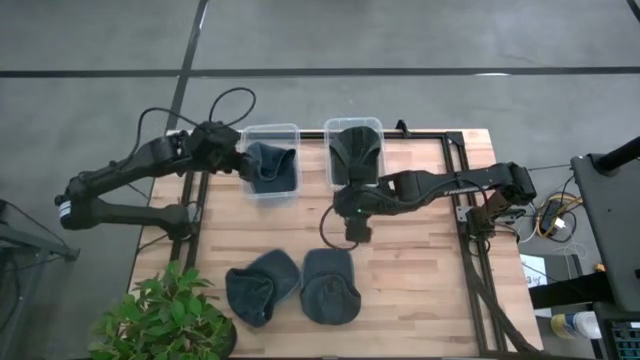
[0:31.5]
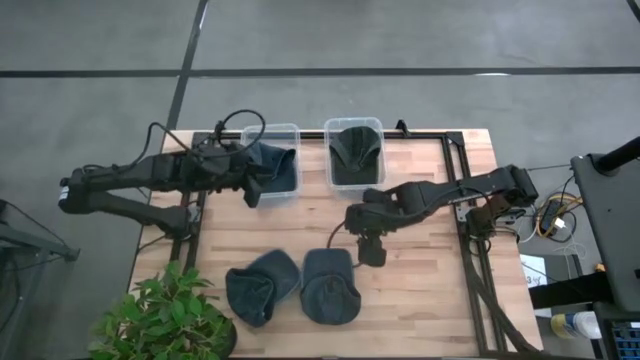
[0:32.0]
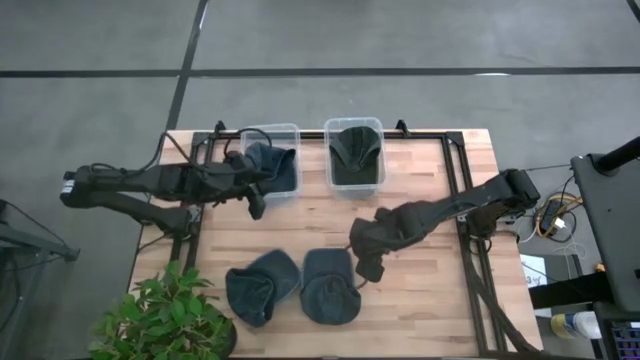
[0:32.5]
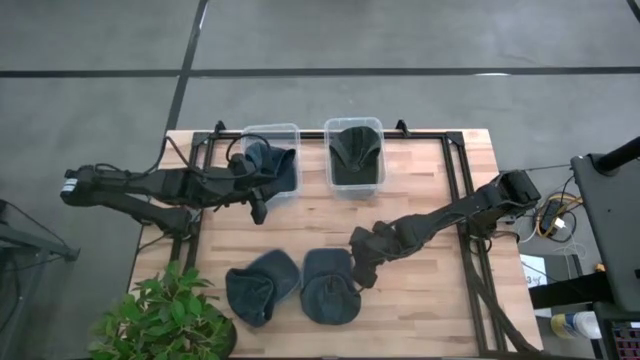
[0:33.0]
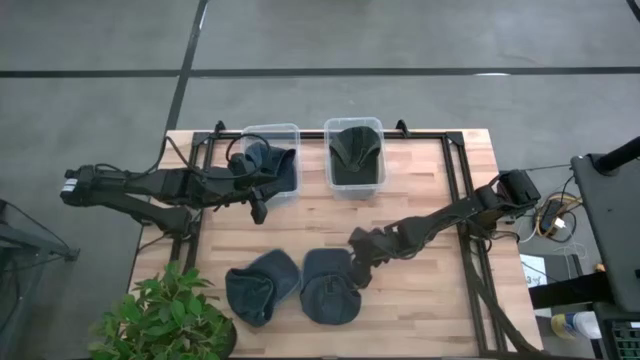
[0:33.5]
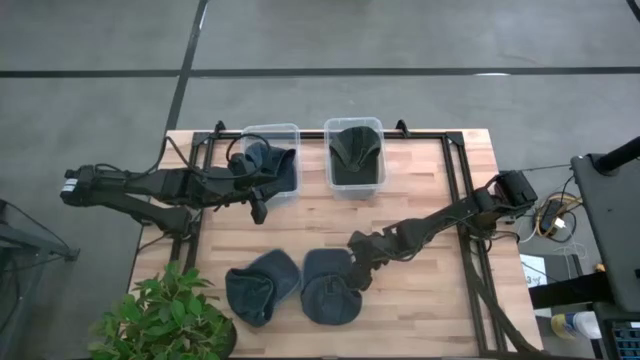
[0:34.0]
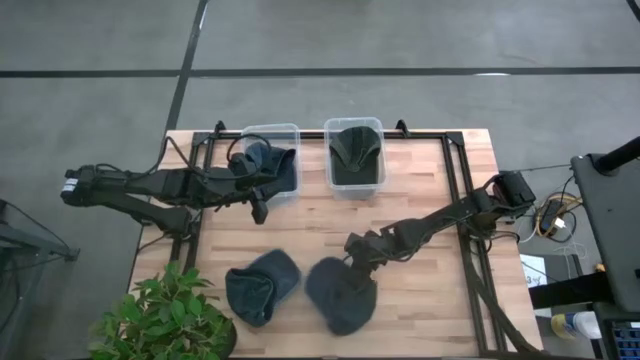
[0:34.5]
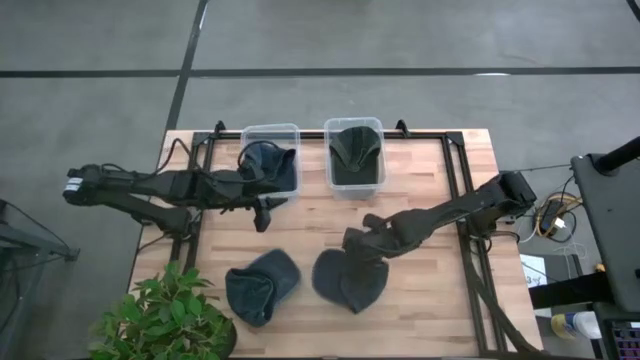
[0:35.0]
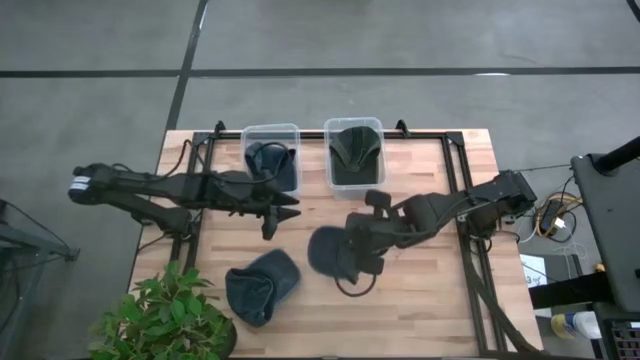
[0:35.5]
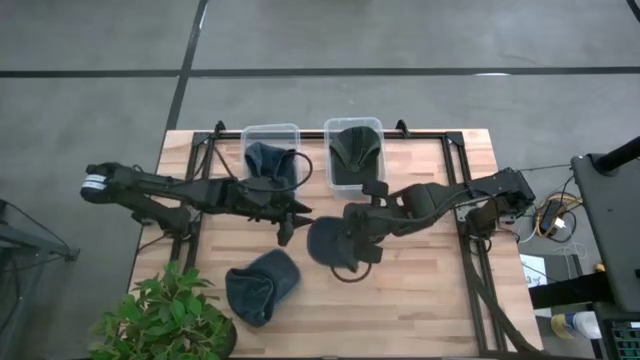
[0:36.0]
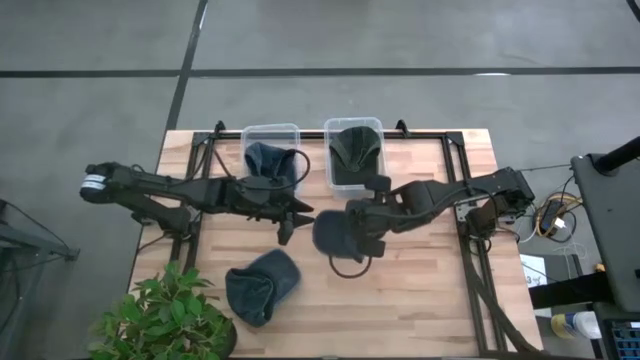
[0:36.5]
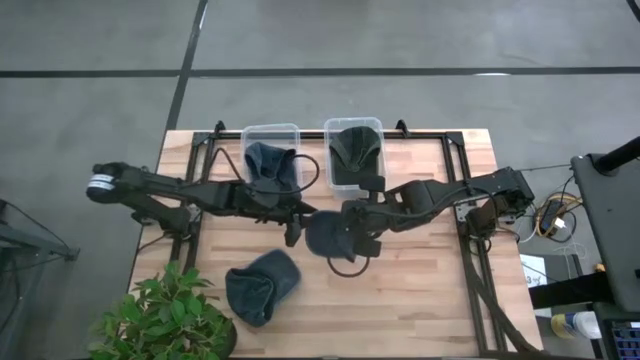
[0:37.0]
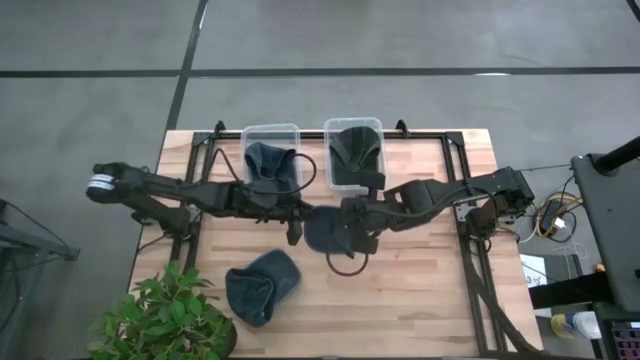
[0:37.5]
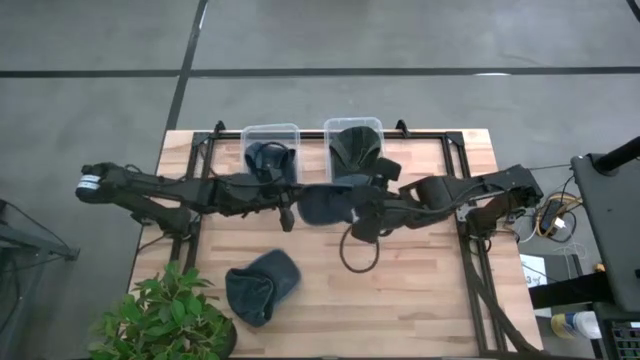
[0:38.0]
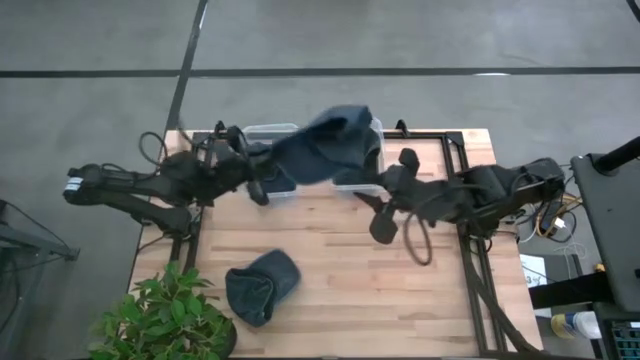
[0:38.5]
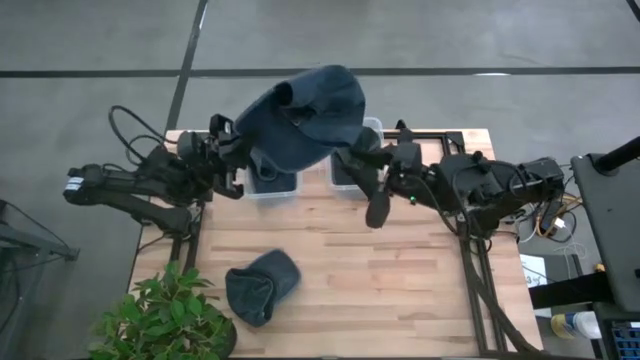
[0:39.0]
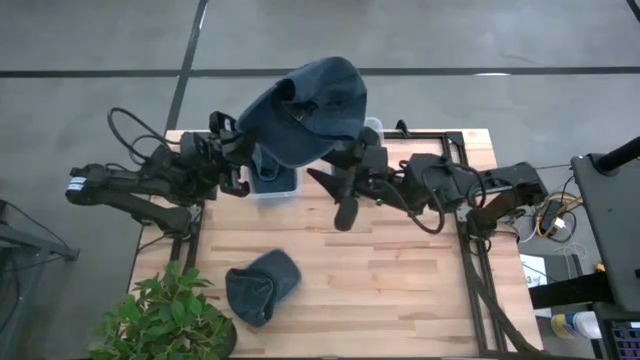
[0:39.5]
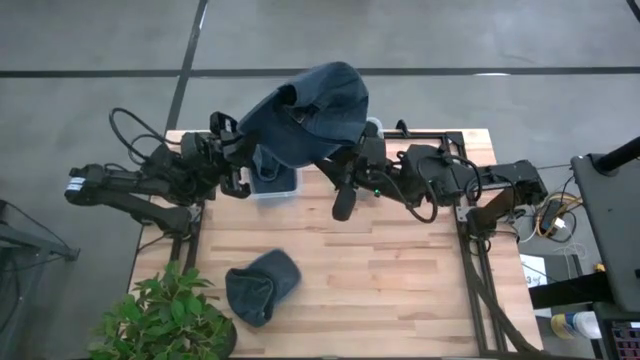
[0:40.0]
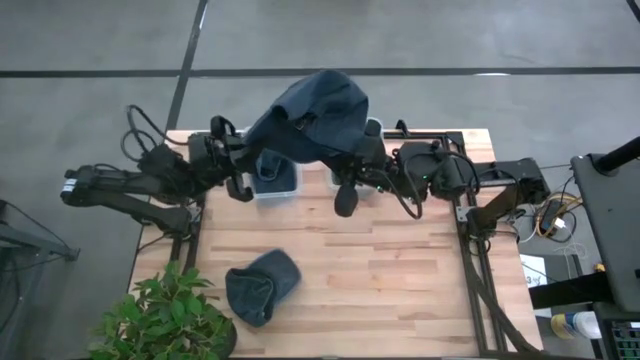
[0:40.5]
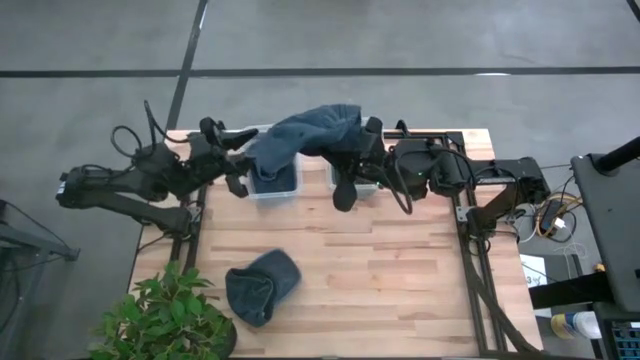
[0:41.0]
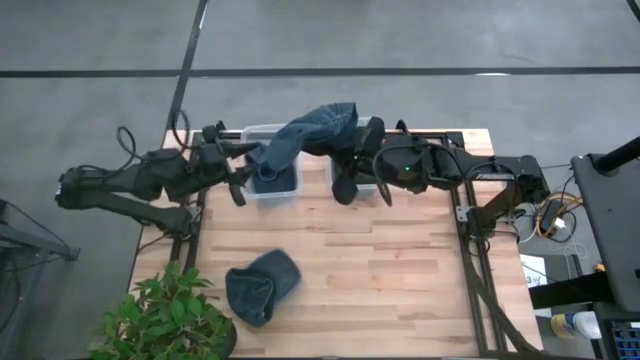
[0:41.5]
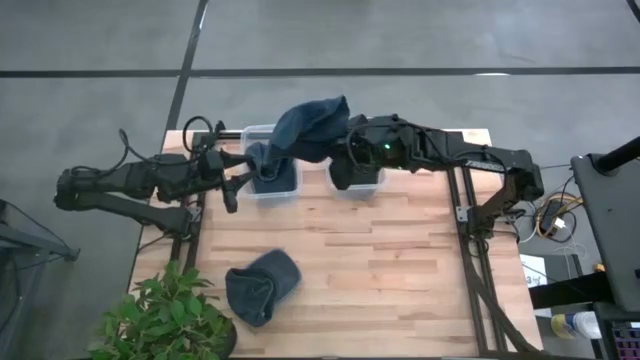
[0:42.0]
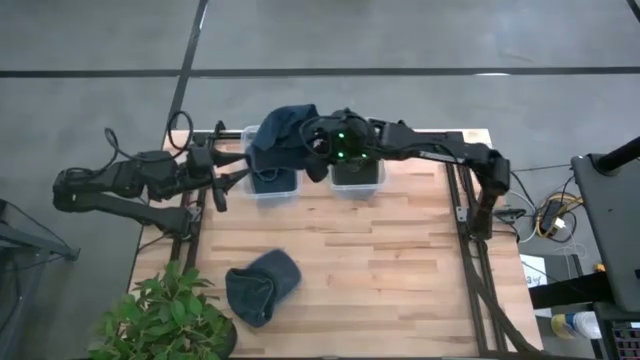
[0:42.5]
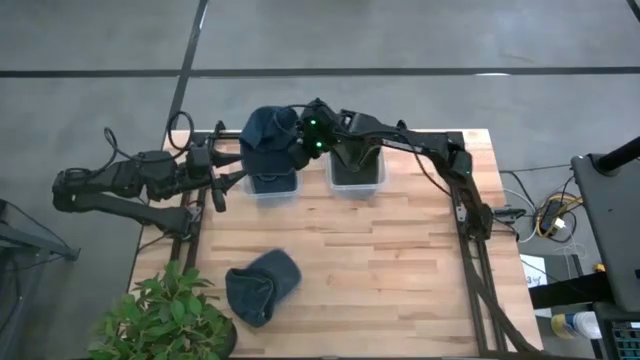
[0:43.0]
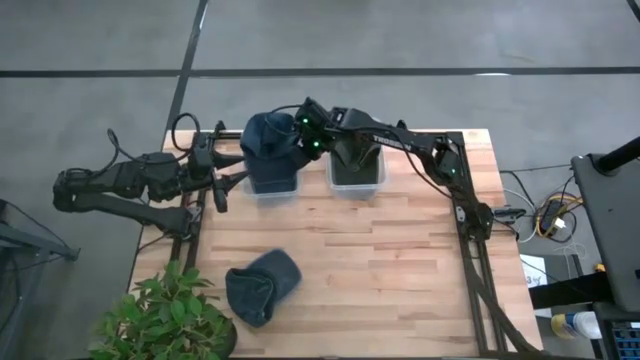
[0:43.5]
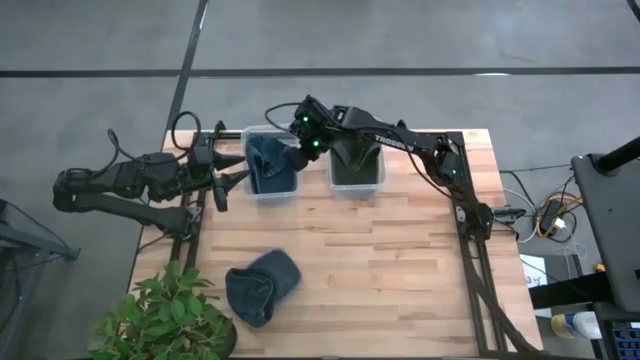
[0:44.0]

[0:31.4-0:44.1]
Task: Pick & Place hat
Put the right blue cap into the left transparent bin

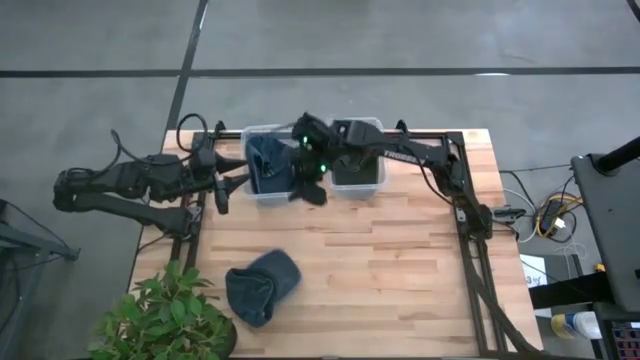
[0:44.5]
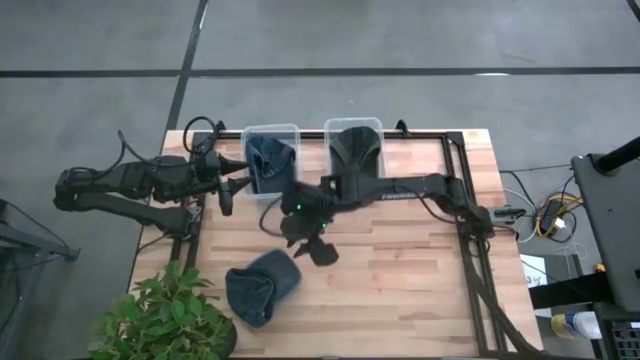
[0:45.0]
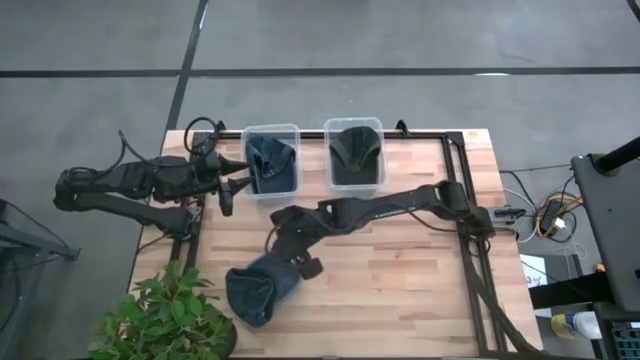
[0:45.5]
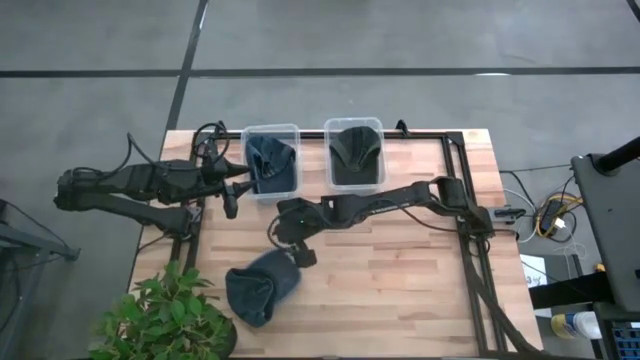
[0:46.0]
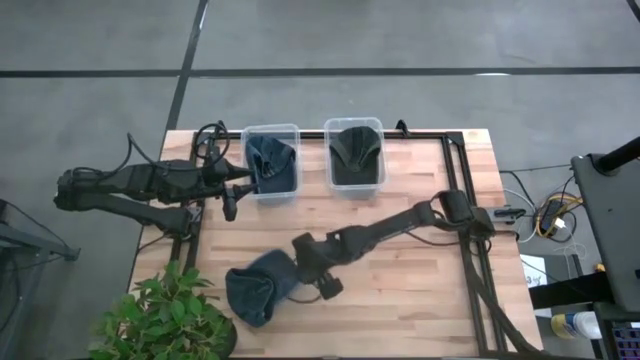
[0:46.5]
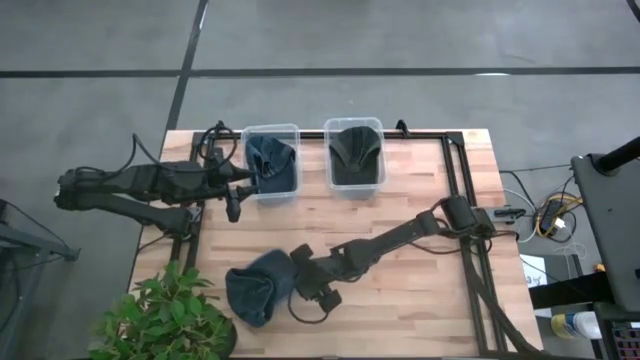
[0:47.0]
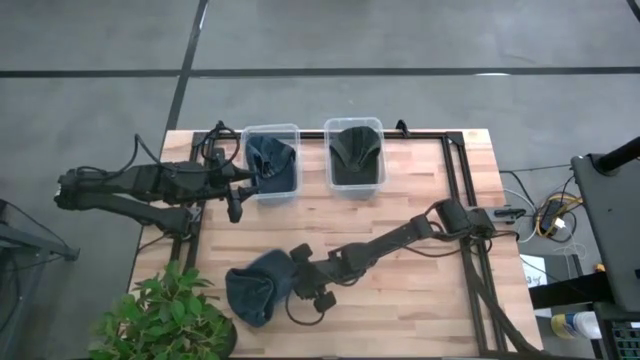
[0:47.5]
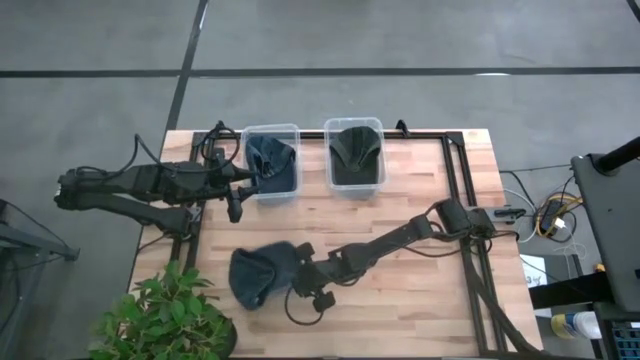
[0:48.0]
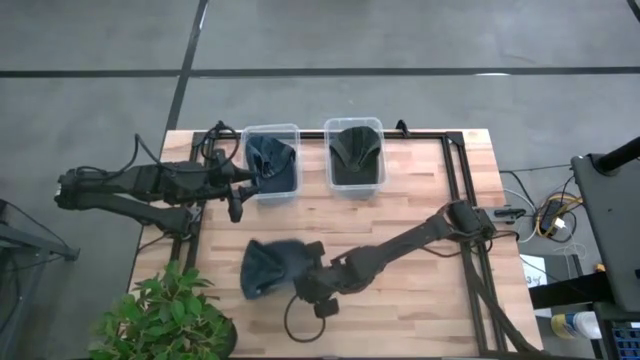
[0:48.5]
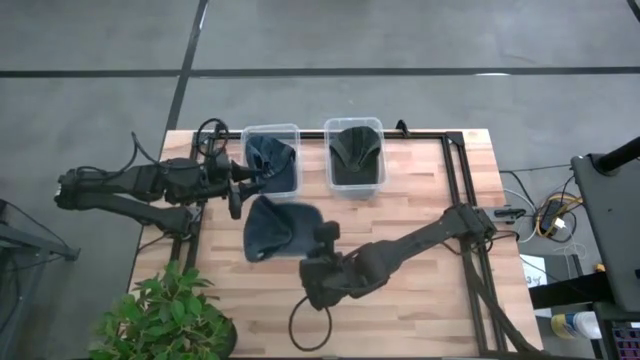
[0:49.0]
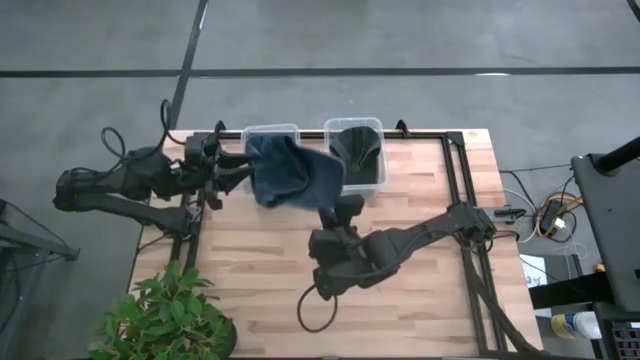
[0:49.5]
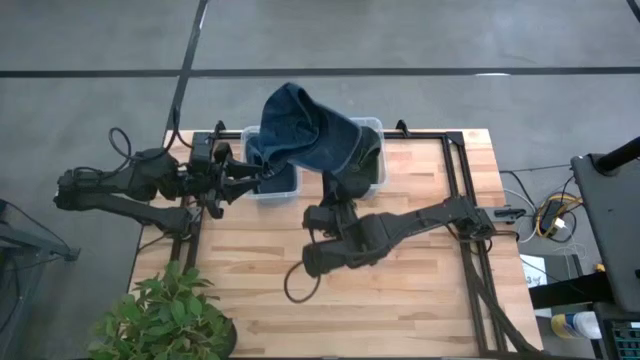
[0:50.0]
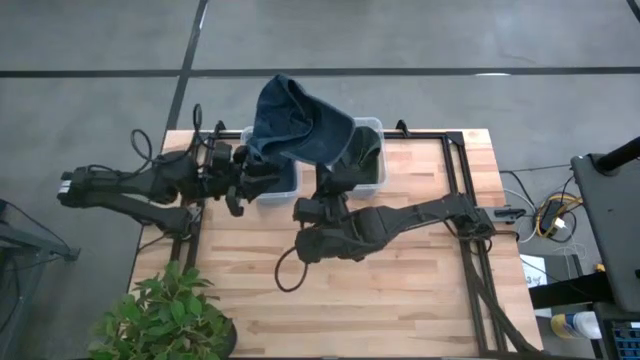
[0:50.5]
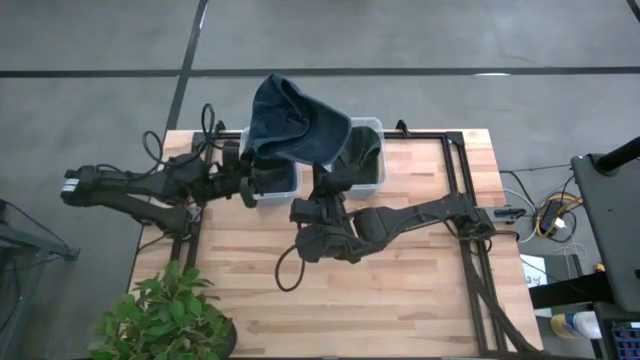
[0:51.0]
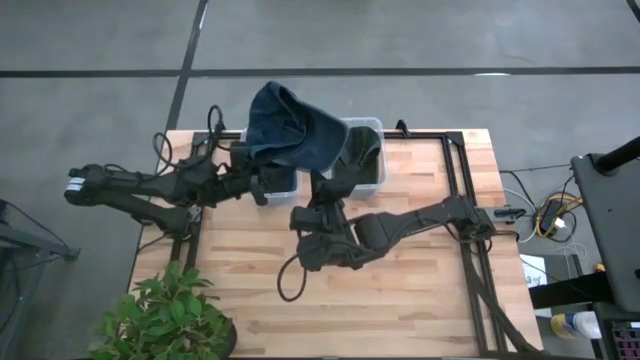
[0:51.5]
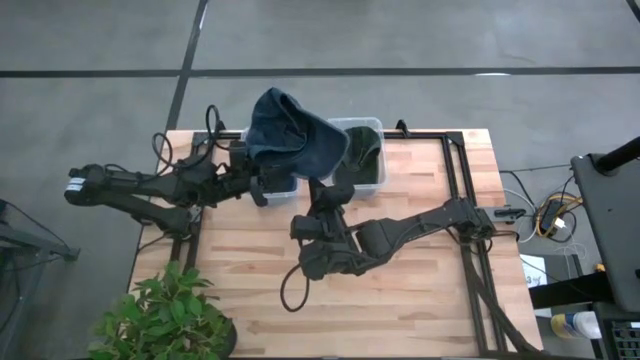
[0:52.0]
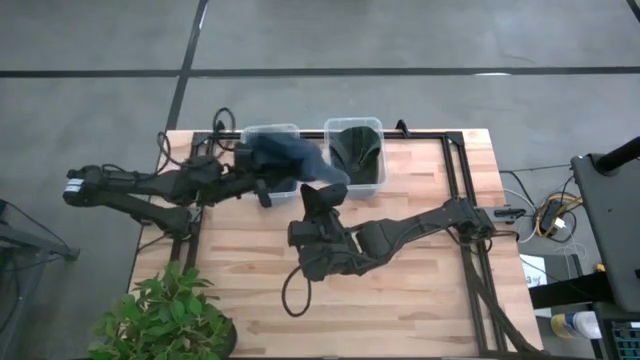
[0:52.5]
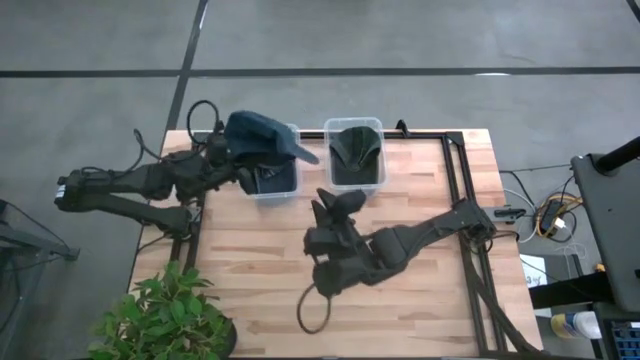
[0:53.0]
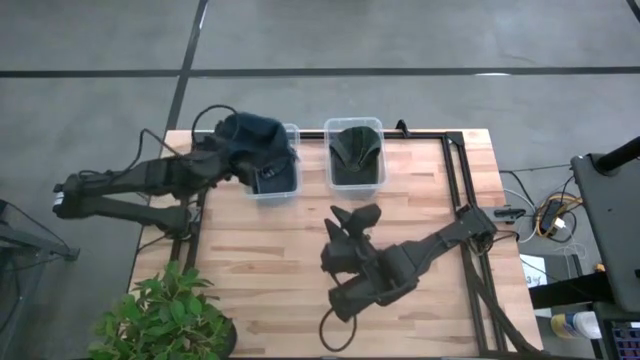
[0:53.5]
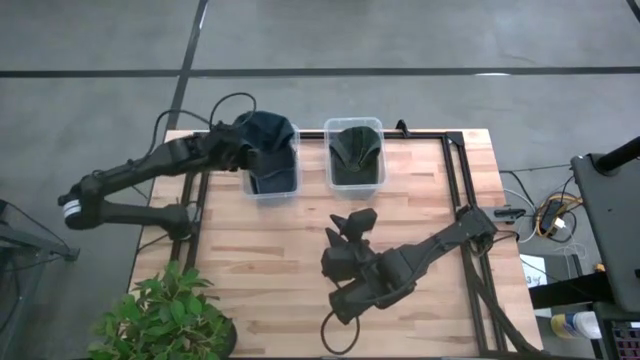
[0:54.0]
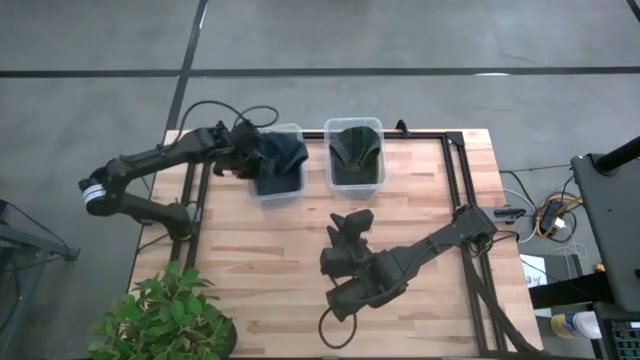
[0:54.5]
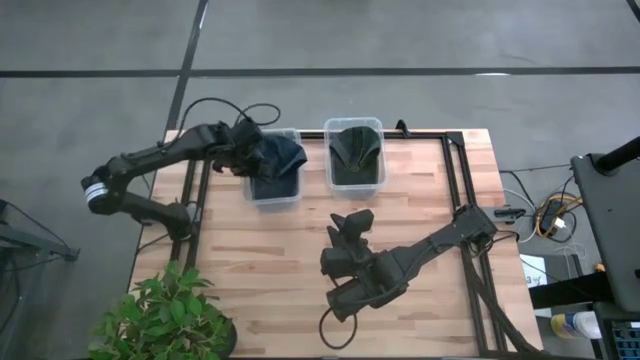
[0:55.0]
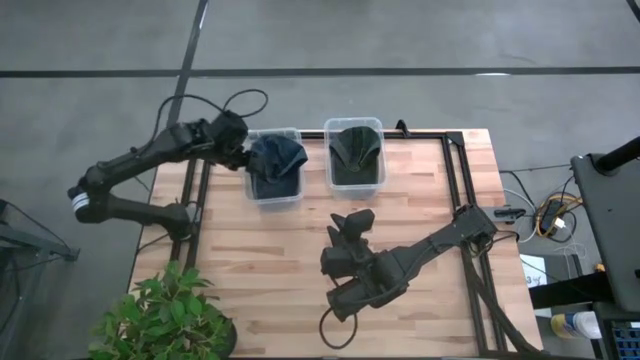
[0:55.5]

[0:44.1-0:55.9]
Put the blue cap into the left transparent bin
